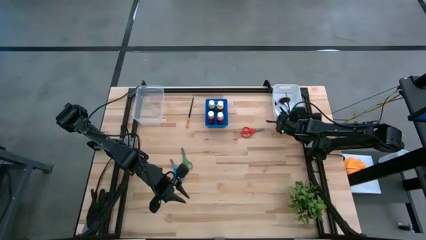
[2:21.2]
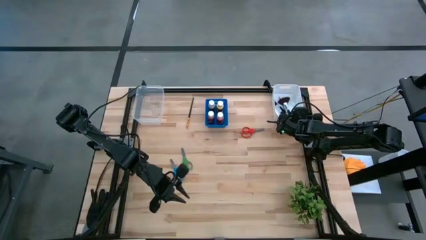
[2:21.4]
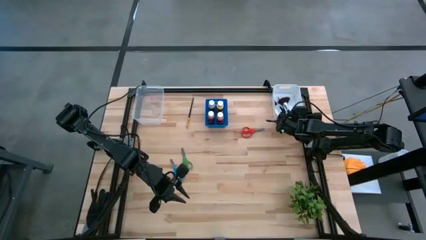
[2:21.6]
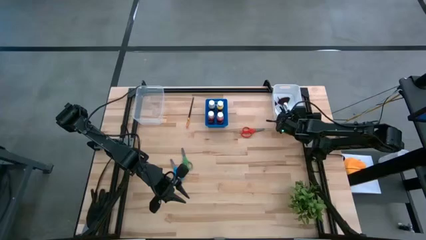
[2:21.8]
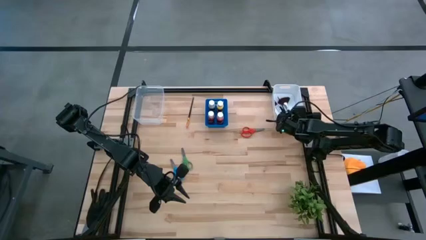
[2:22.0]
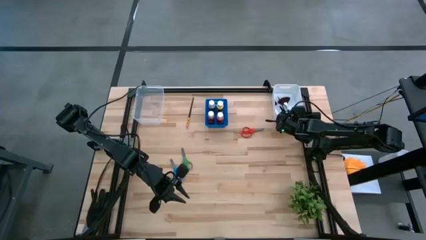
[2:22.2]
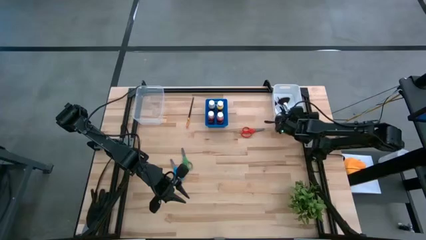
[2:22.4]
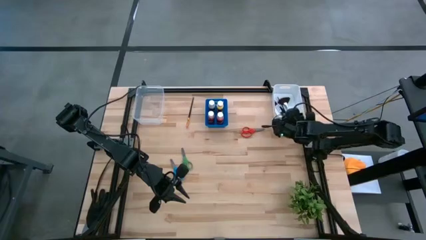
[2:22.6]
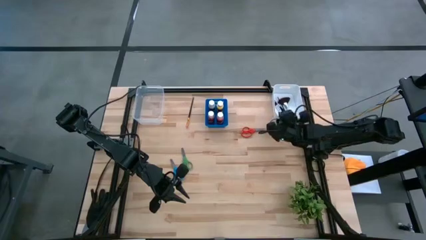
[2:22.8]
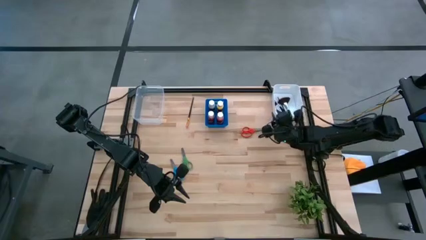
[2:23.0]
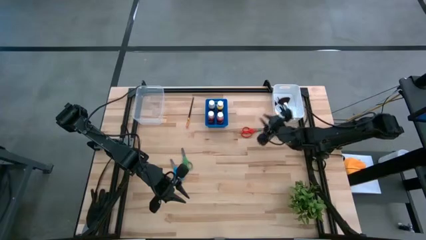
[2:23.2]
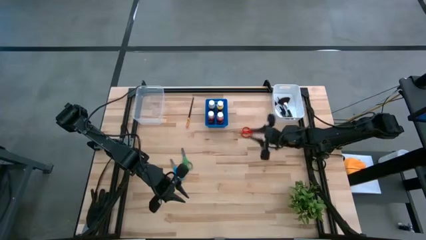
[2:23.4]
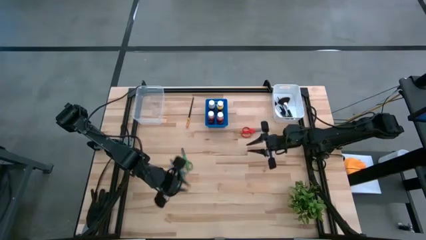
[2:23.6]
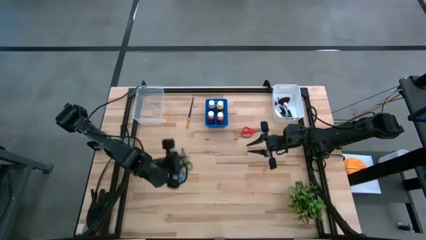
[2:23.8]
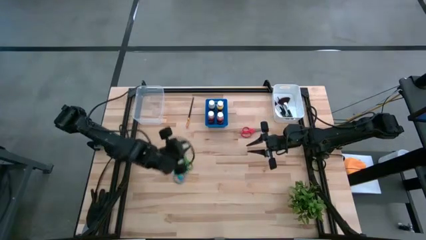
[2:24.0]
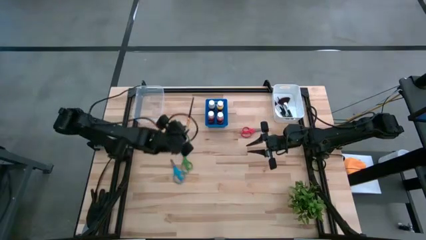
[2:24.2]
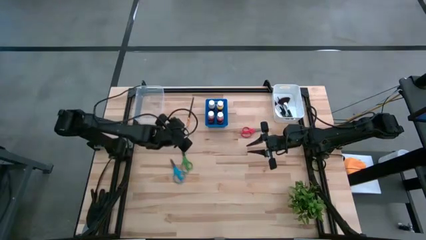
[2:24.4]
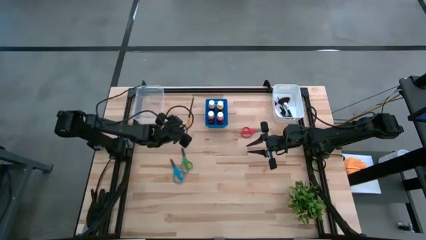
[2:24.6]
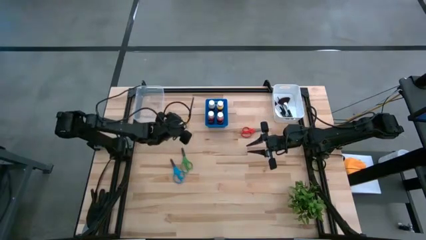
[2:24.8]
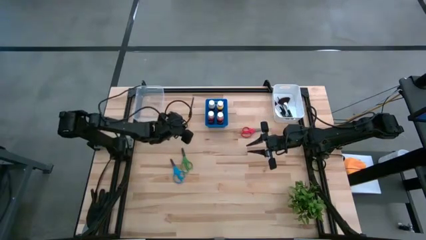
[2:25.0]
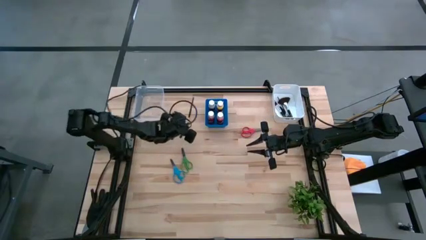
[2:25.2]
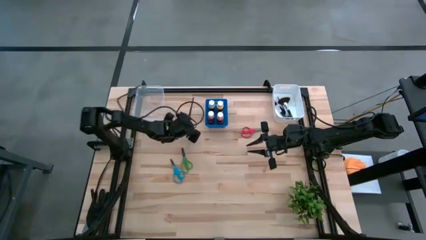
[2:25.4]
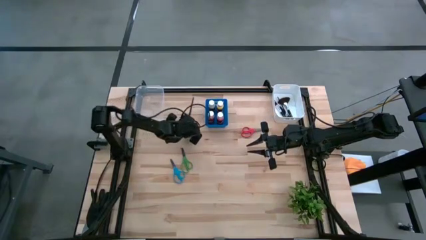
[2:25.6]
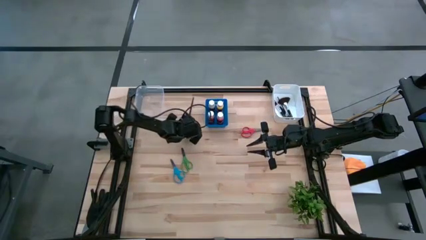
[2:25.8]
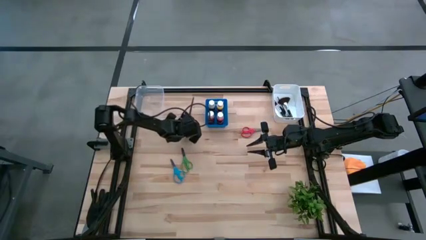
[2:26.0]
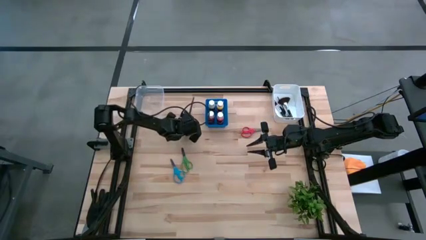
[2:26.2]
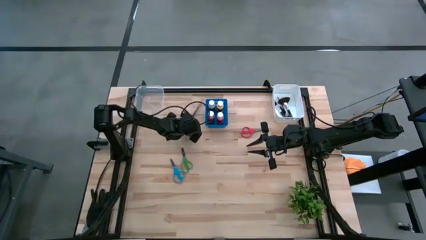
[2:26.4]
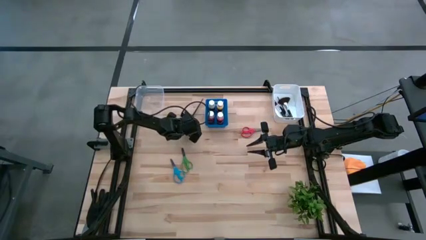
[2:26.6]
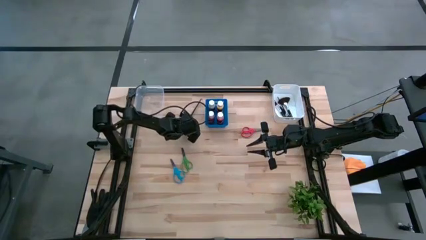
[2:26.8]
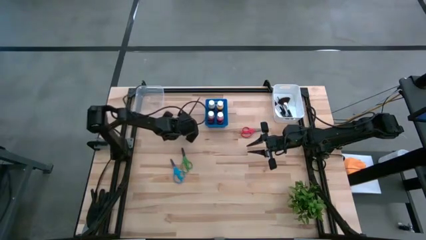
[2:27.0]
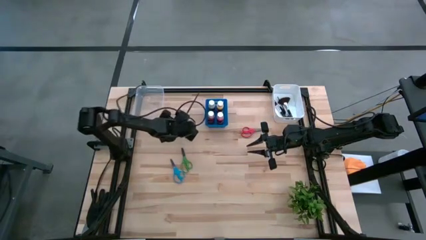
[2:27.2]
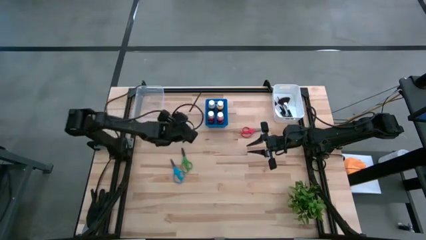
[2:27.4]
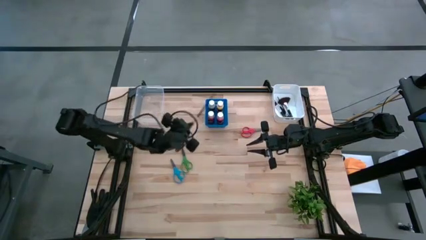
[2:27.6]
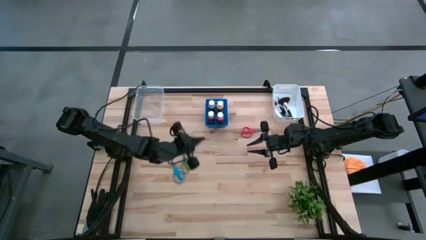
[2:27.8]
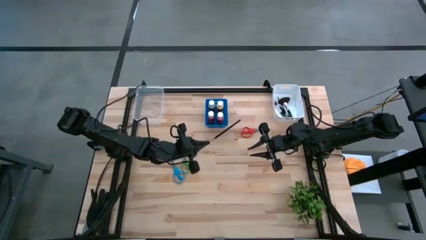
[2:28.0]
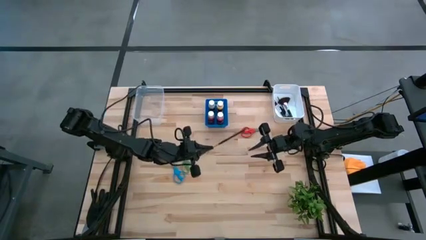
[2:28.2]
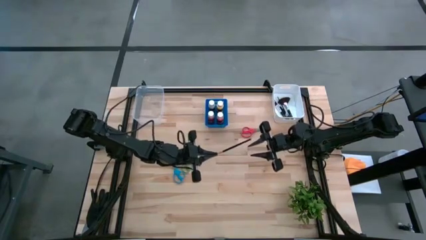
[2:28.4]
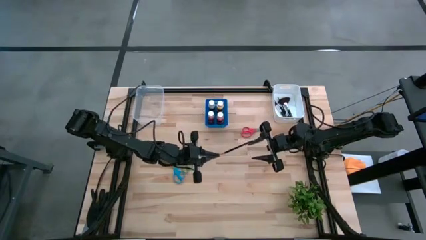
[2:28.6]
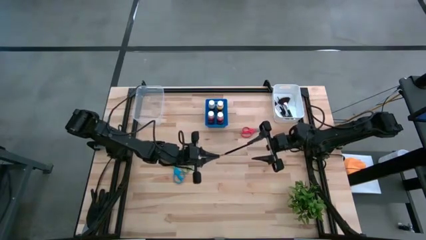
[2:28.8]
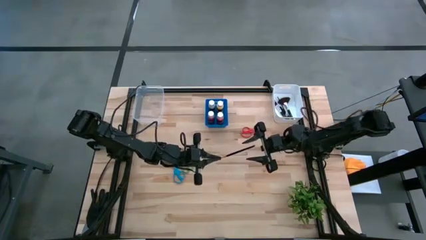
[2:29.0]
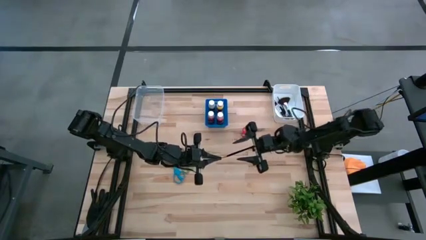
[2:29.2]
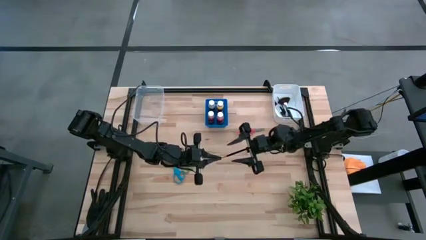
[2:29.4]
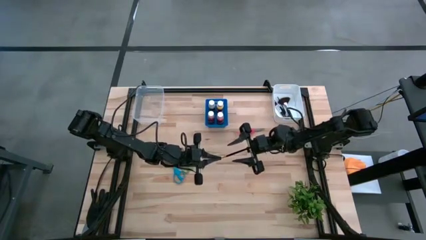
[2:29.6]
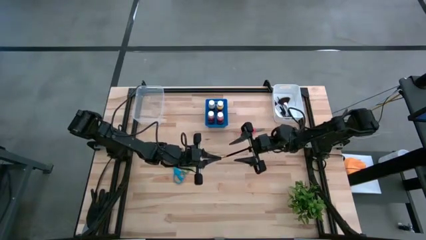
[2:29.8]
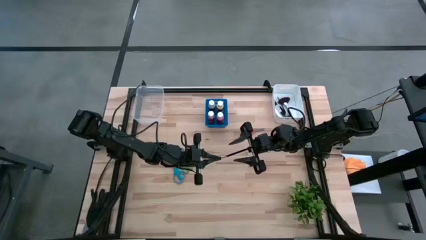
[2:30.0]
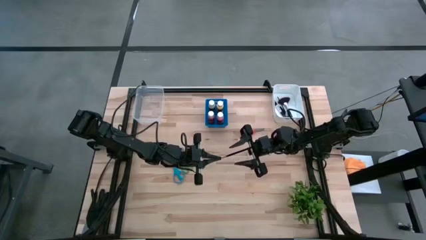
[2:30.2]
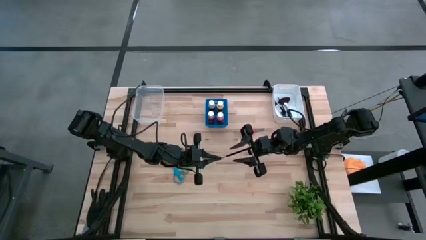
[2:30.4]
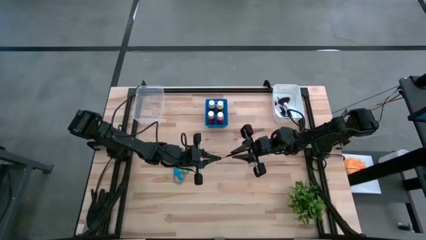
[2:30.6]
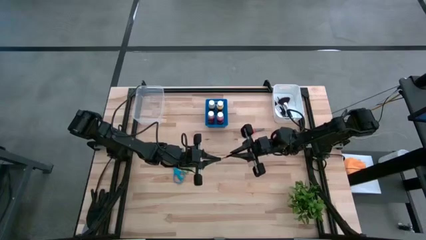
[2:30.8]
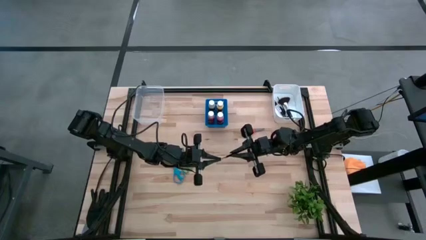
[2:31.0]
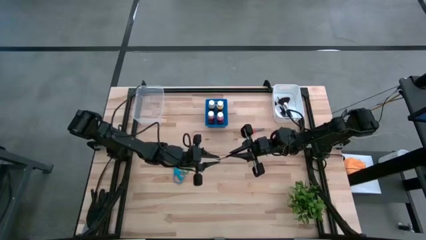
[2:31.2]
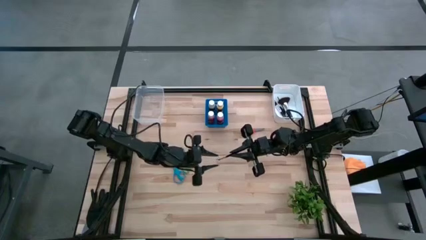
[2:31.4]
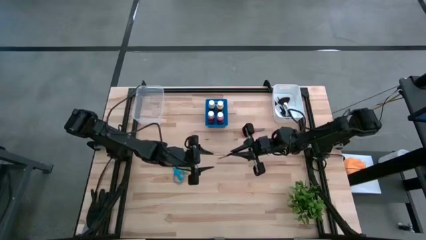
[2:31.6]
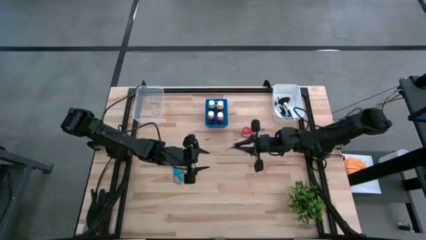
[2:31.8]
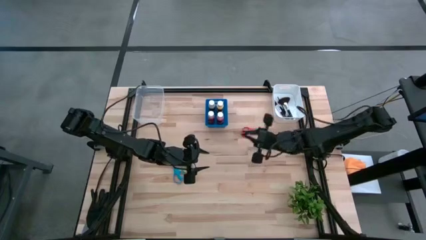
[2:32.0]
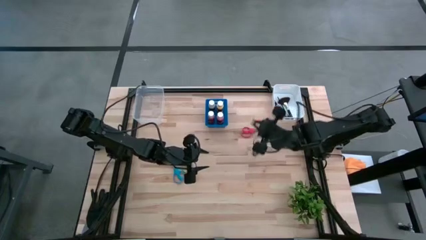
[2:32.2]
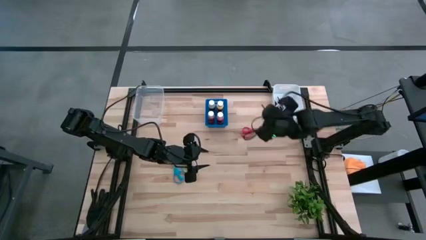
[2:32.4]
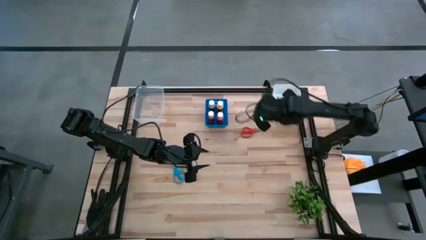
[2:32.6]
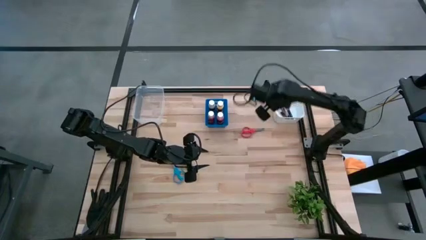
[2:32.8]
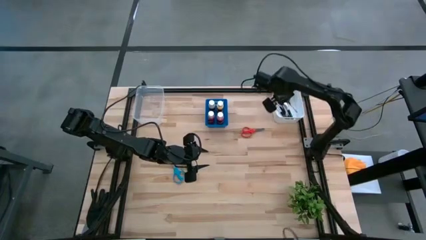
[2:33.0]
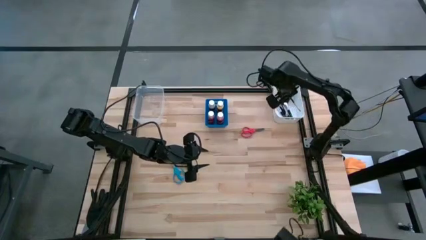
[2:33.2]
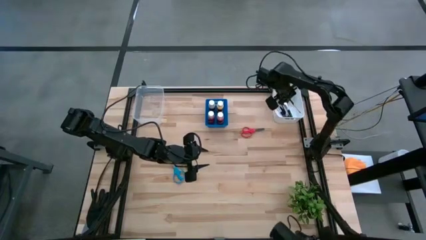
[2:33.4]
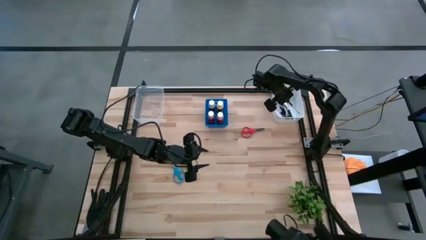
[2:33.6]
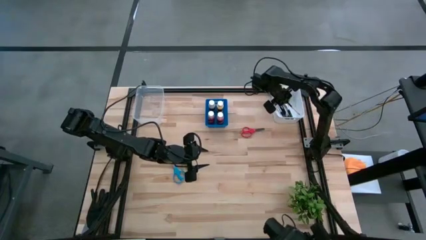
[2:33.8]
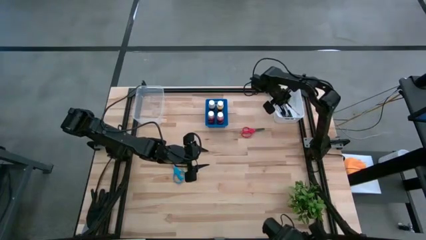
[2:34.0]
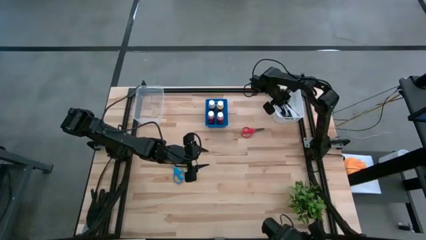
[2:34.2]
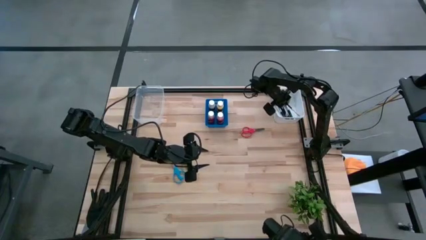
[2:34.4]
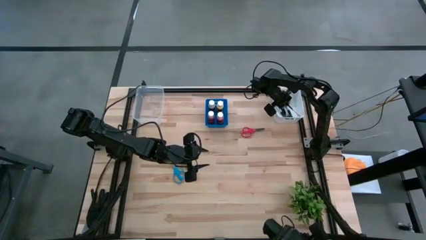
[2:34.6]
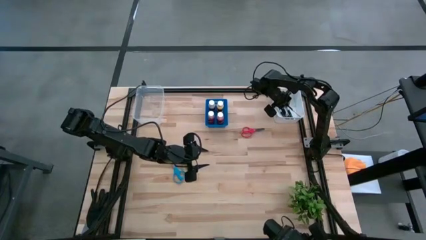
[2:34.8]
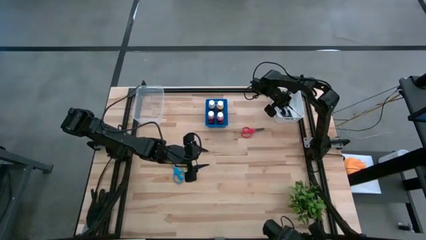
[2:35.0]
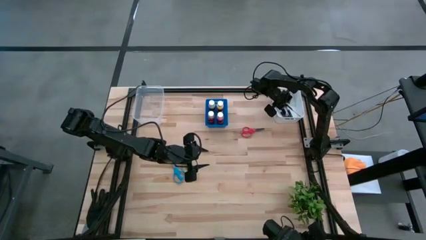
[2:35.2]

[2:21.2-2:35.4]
Task: Pick & Place Paint Supplies
Put the black eyebrow brush into the white bin
